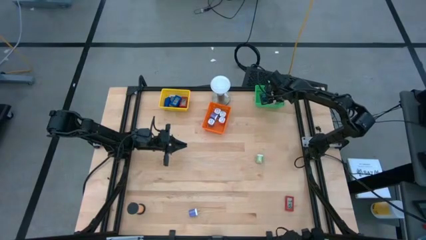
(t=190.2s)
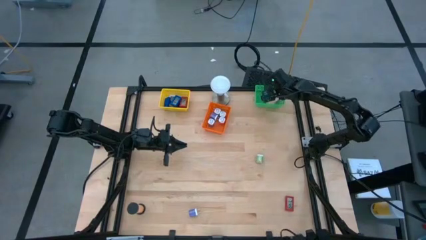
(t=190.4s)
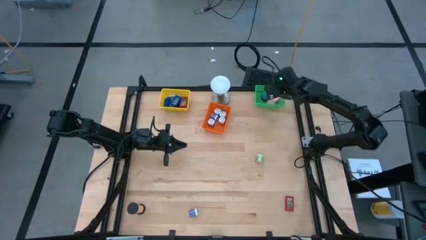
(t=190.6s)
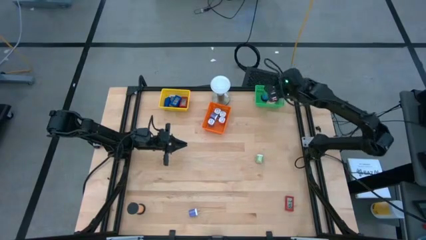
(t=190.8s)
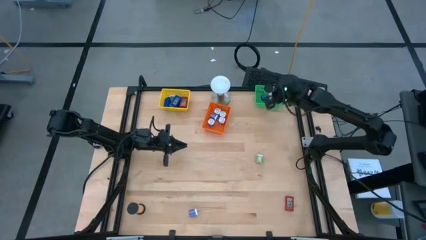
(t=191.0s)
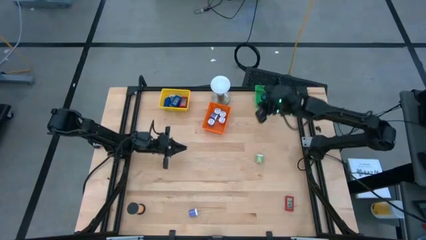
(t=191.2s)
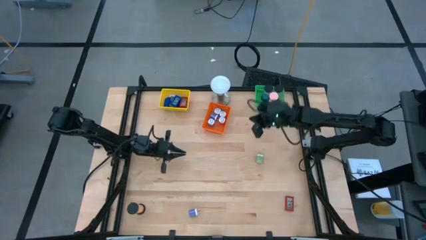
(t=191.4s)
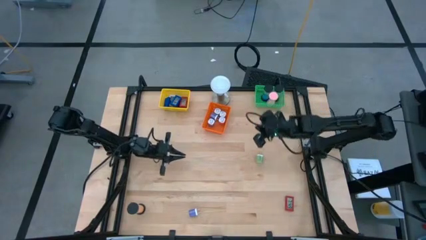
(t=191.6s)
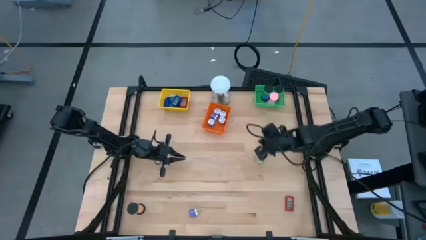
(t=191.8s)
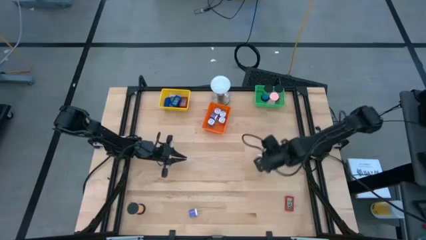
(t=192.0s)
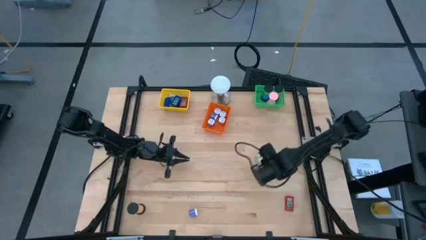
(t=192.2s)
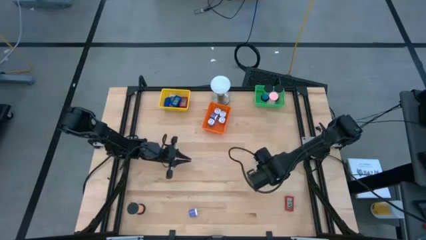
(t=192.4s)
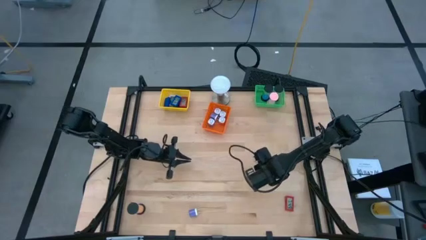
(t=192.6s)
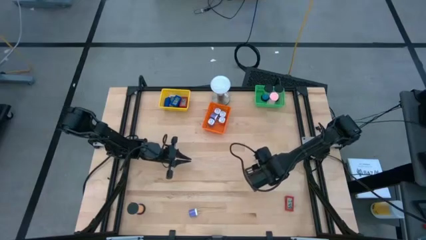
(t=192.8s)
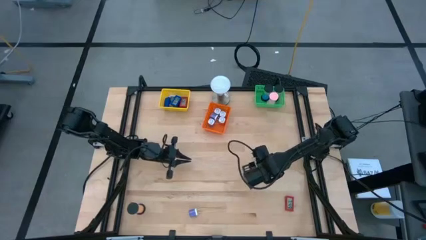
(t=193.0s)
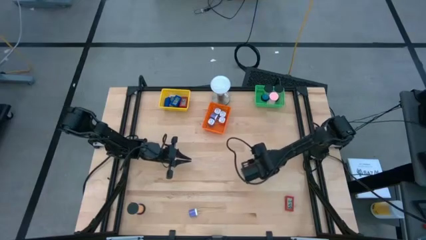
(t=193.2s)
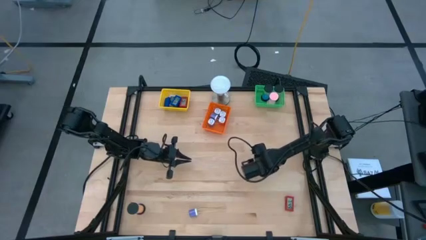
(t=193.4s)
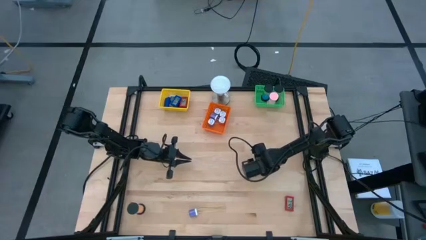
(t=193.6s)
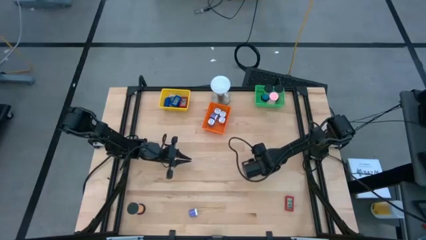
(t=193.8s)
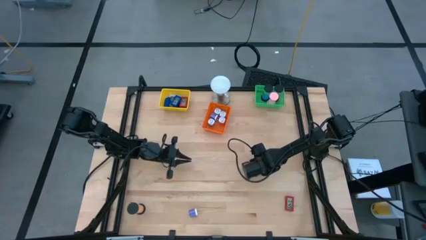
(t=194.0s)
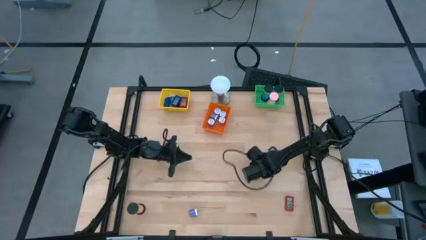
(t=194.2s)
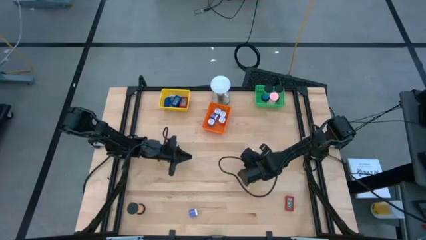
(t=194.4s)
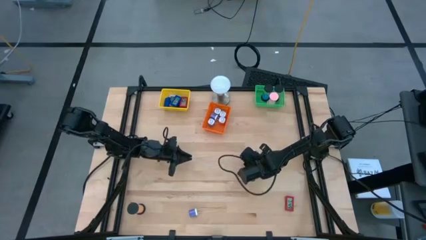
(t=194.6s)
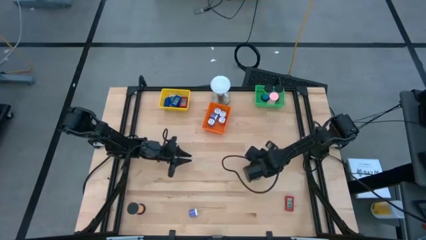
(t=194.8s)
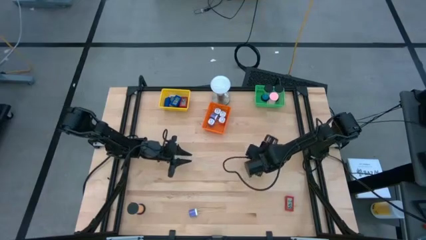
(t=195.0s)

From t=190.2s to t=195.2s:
Task: Pick & Place Office items
Put the green charger adapter into the orange bin

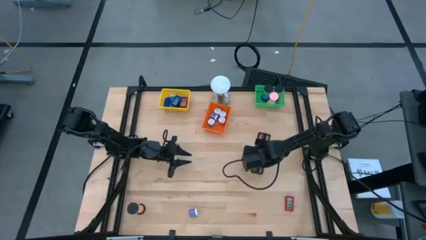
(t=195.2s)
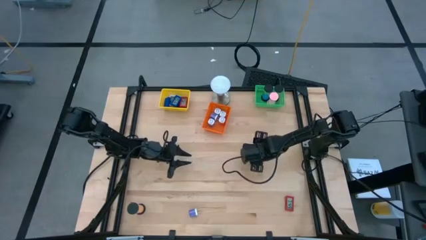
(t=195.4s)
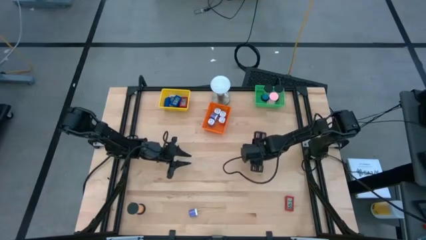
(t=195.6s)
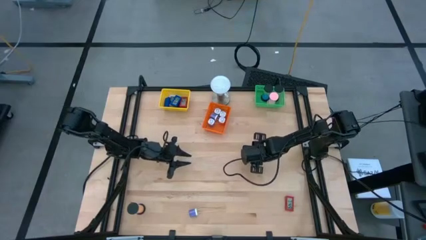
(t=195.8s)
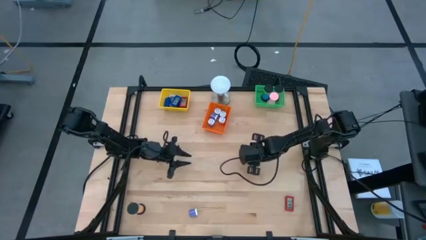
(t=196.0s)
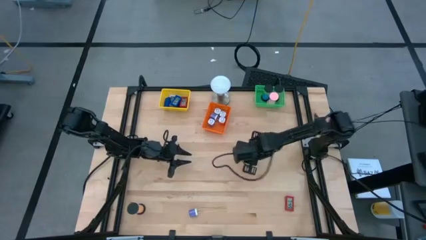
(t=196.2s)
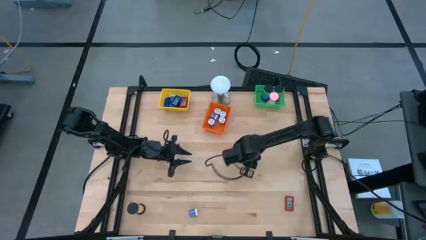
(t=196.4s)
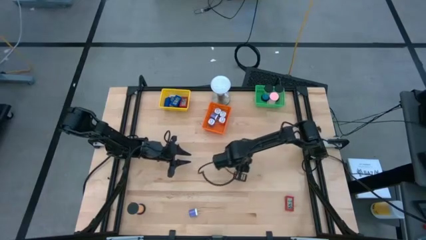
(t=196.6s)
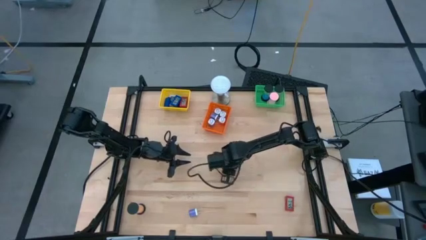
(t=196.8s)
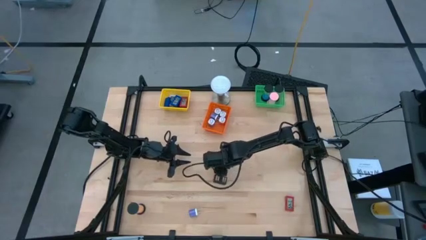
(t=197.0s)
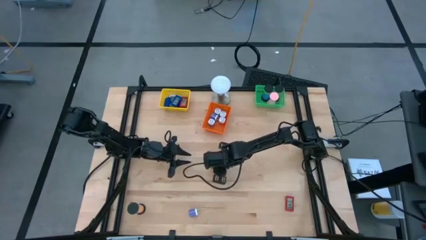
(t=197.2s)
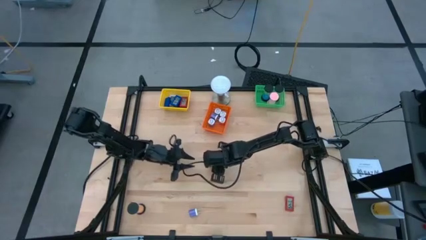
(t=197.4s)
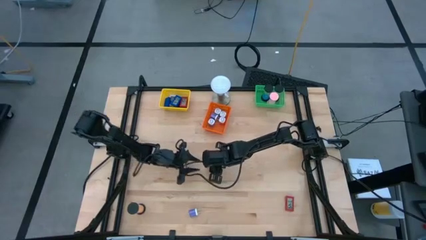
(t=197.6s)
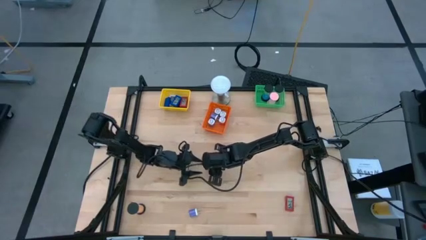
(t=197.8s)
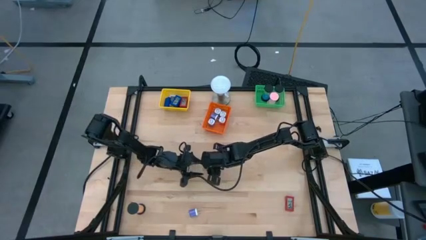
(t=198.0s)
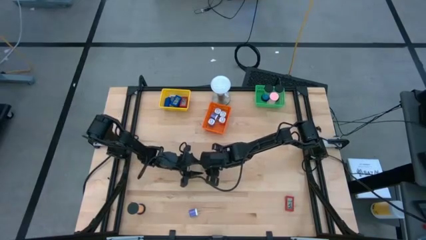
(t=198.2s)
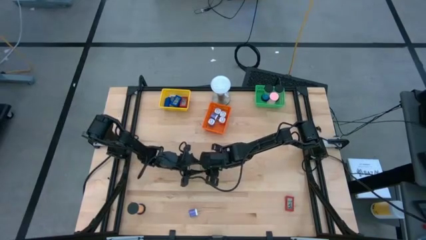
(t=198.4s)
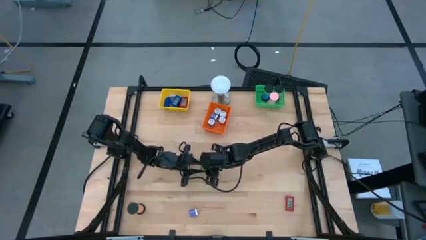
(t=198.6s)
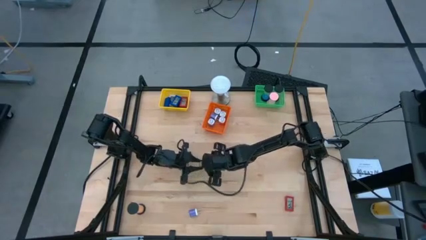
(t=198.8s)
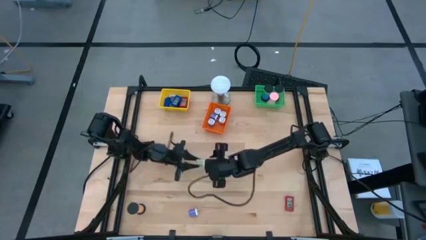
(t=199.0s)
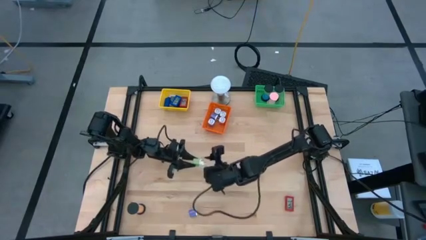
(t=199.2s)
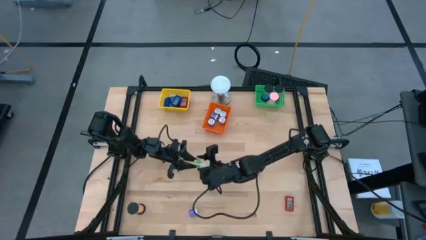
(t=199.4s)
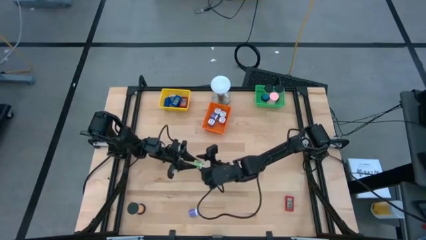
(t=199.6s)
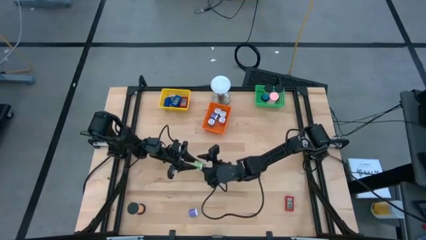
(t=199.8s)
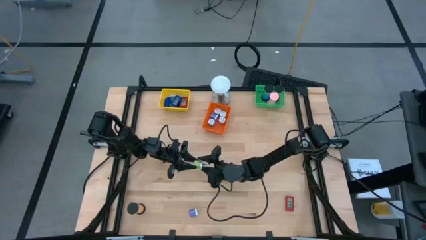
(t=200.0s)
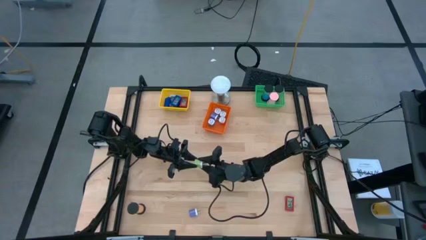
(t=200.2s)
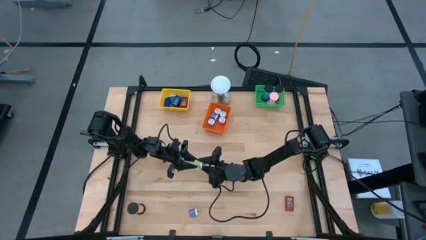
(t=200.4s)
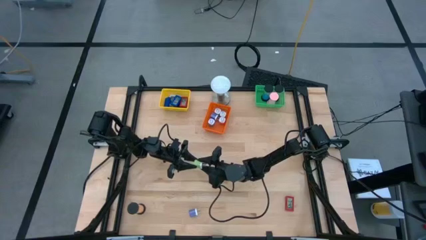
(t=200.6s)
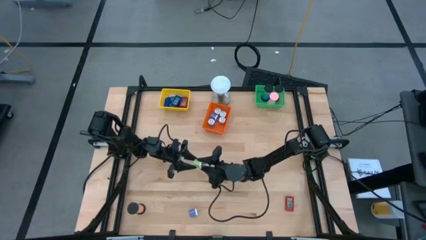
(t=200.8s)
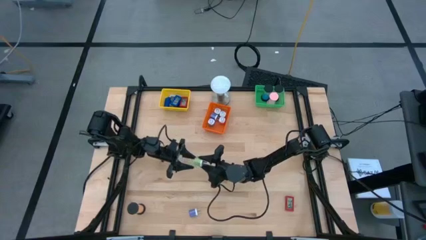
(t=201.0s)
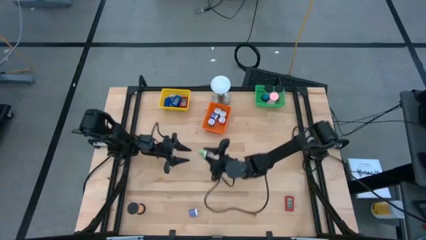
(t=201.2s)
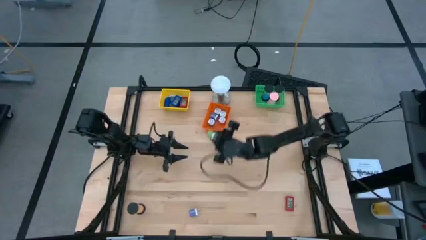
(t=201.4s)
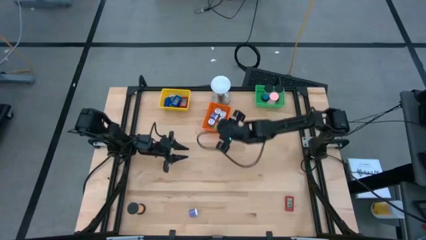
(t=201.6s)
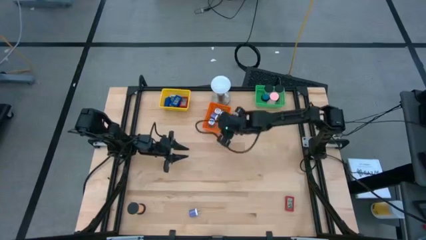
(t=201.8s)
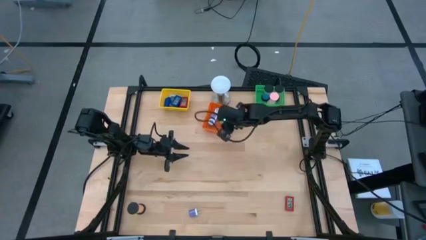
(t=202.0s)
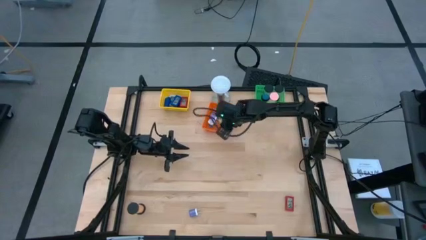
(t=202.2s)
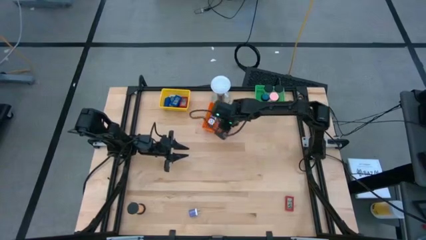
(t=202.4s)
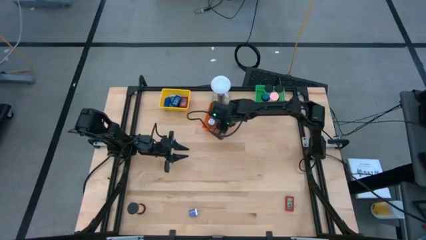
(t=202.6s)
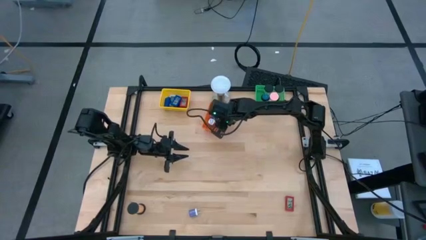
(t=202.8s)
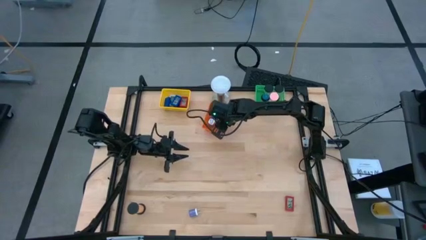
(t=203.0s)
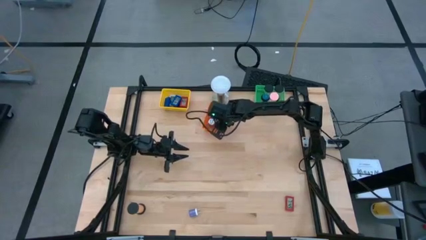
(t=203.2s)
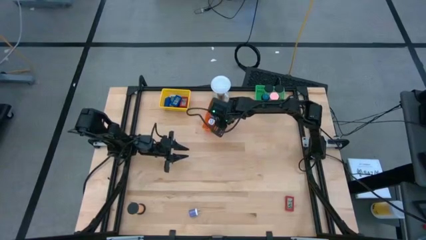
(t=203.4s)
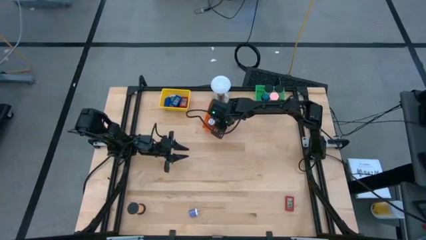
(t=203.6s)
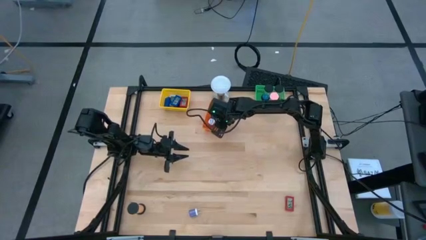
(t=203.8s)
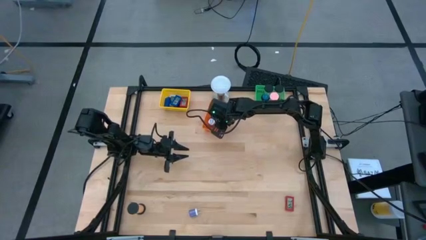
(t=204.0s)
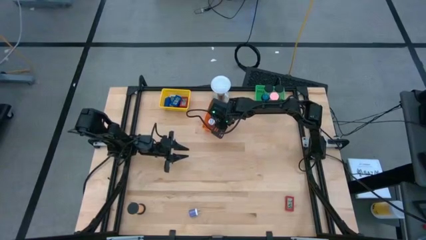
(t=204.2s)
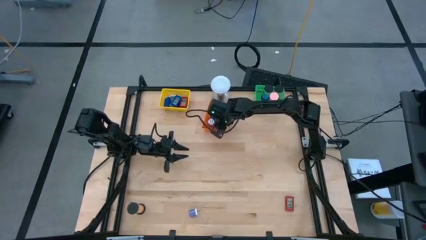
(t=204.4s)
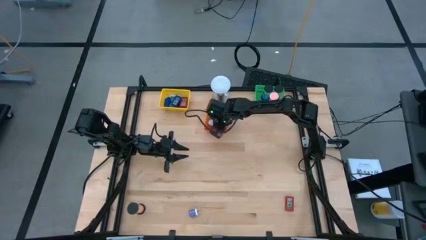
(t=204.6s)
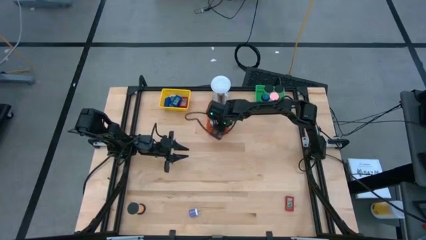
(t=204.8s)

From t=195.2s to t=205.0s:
Put the green charger adapter into the orange bin
